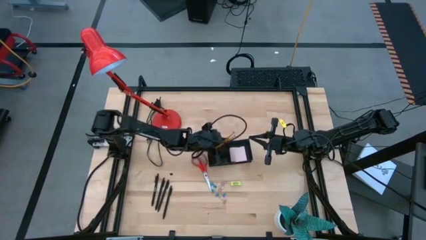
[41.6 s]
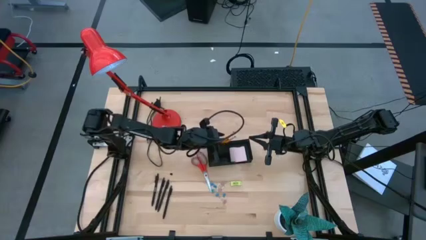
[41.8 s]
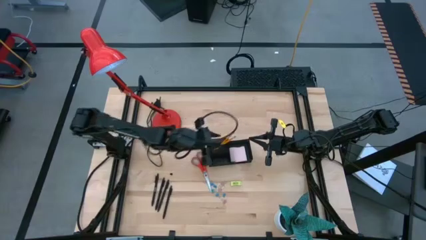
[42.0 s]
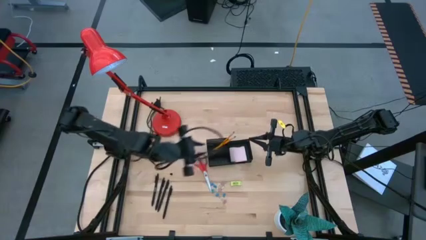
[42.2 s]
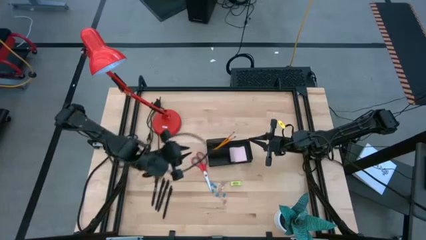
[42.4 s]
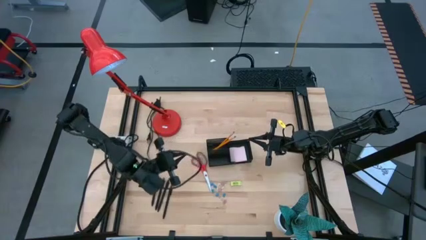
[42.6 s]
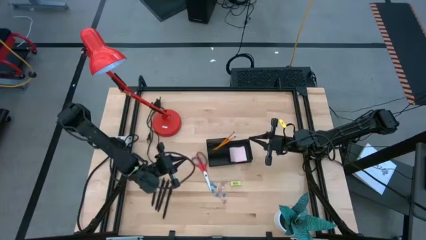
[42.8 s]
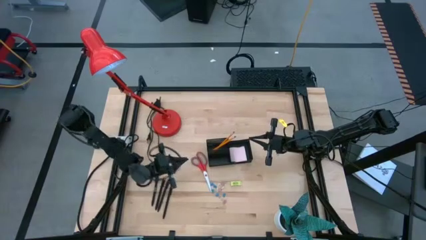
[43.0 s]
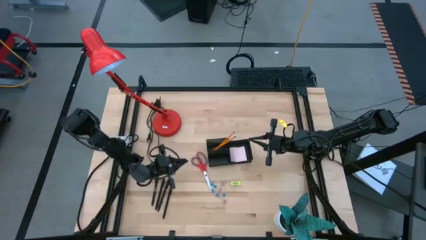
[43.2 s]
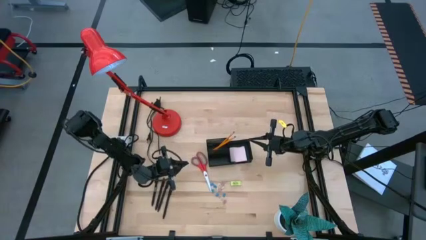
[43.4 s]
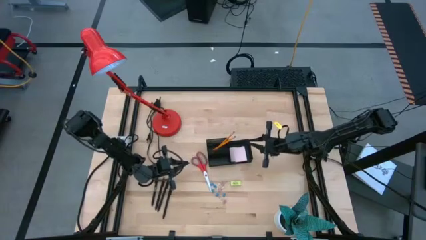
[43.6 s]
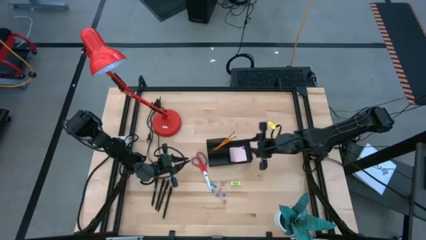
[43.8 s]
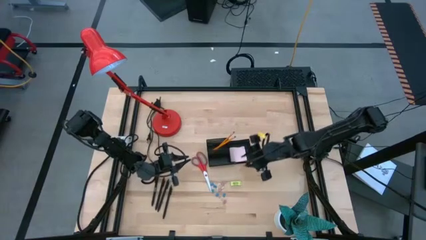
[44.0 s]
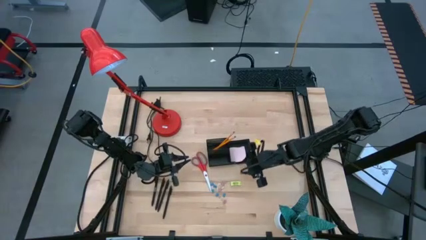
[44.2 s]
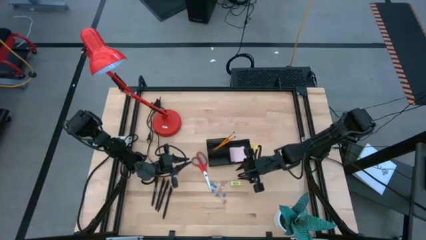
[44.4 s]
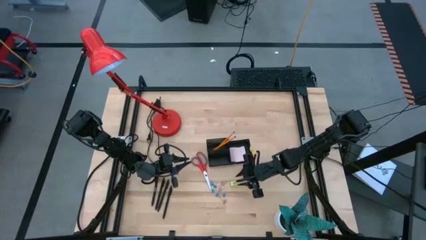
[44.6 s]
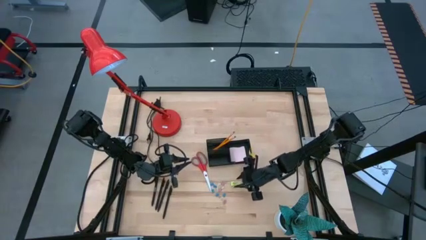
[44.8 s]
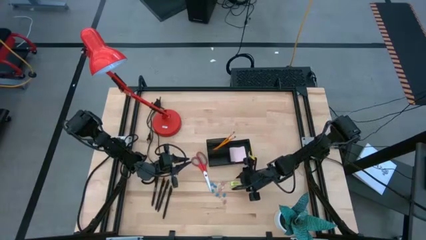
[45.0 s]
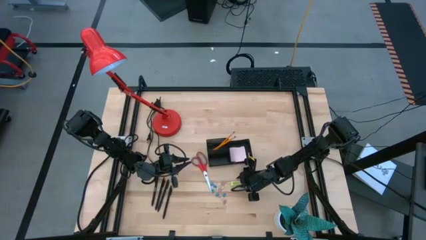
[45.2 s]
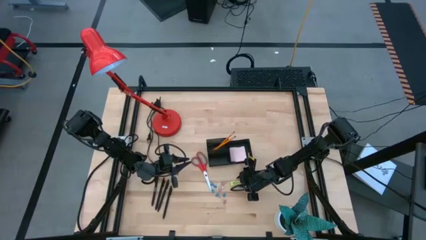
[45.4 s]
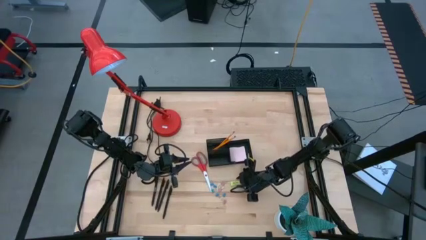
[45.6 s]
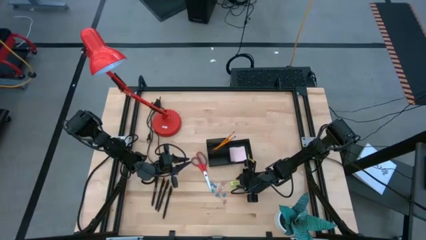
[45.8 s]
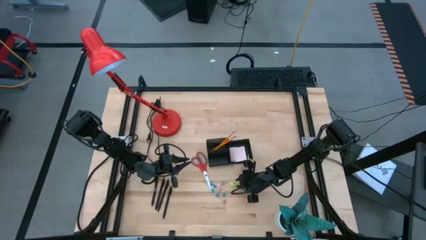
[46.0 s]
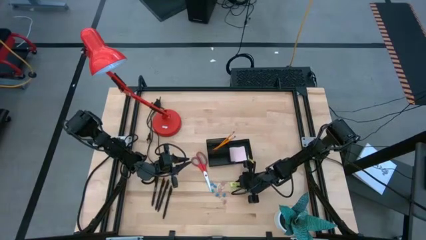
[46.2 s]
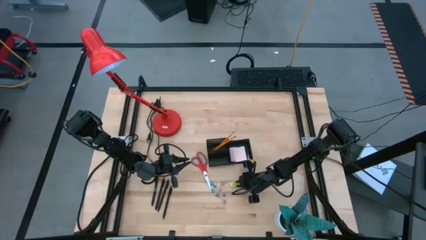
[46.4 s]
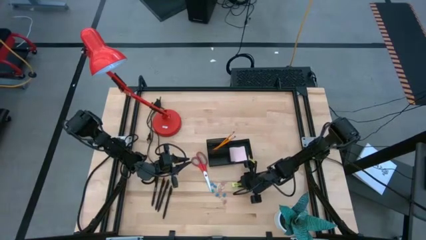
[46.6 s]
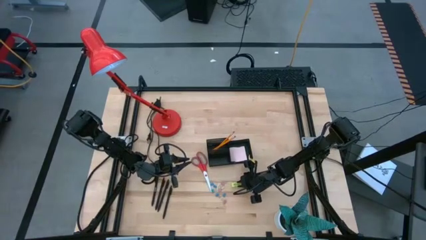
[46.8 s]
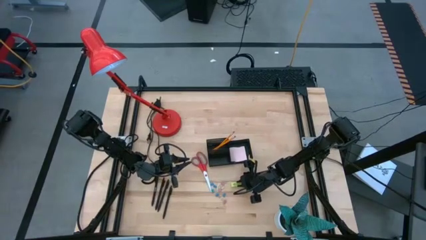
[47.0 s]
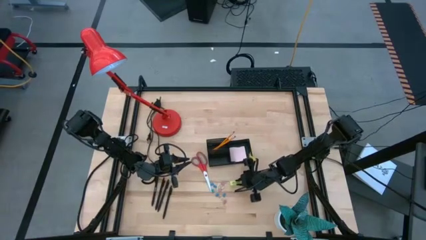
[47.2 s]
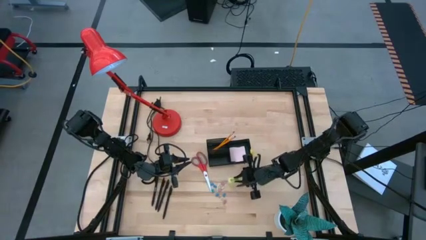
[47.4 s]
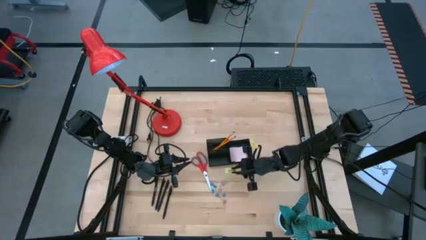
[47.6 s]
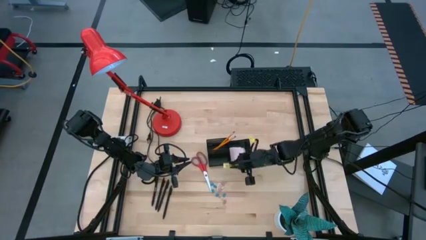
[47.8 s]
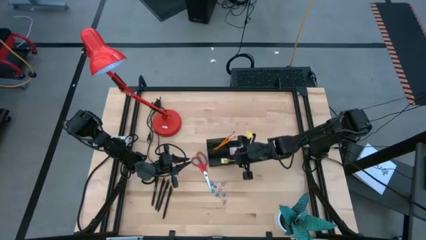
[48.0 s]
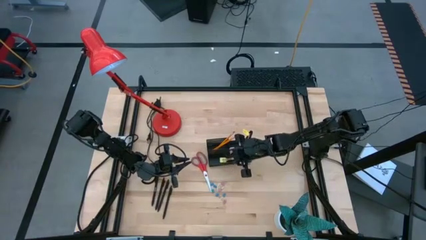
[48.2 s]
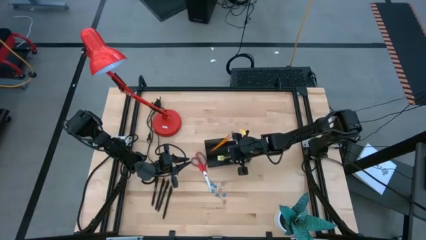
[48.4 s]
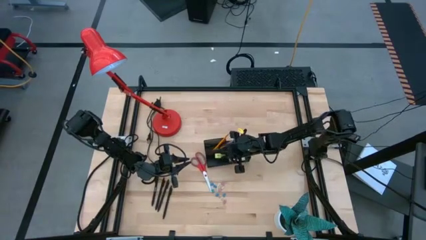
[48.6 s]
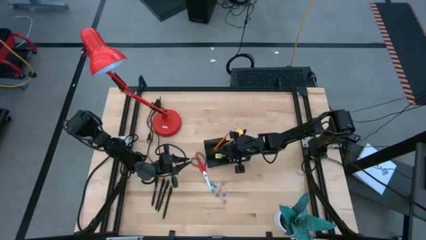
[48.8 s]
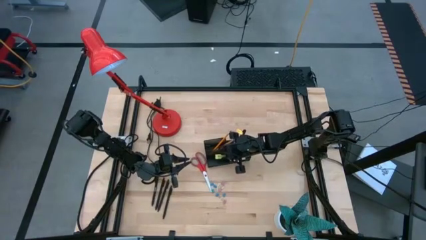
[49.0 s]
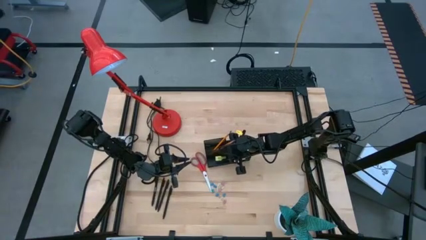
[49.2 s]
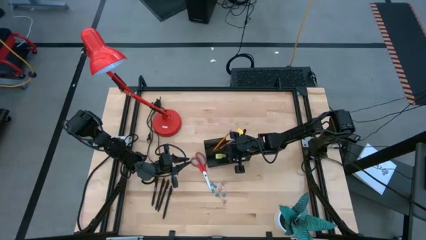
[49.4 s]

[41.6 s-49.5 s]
Task: Pick and place office supplies into organizer
Put the yellow eraser into the black desk organizer

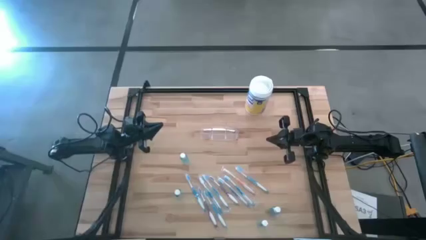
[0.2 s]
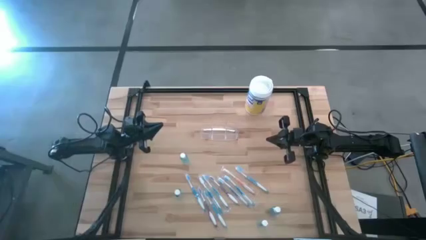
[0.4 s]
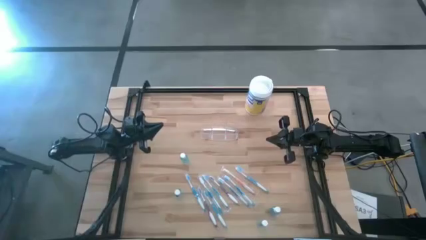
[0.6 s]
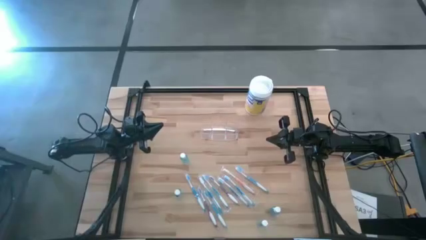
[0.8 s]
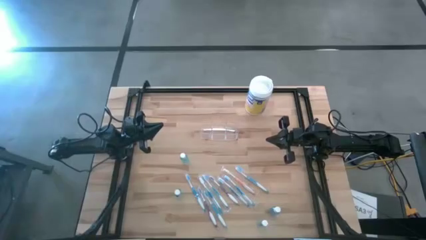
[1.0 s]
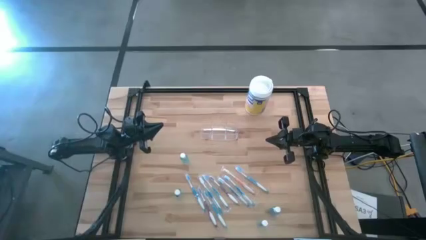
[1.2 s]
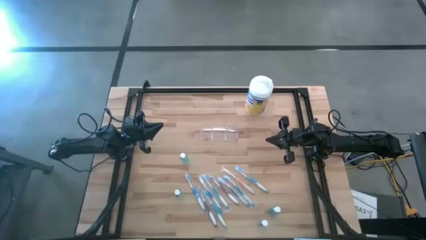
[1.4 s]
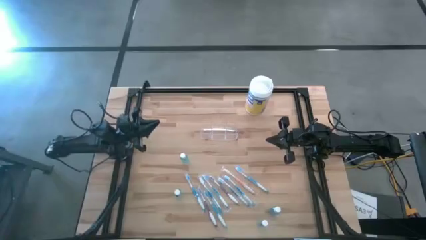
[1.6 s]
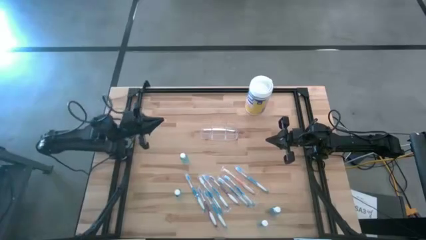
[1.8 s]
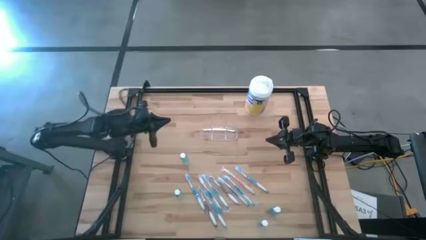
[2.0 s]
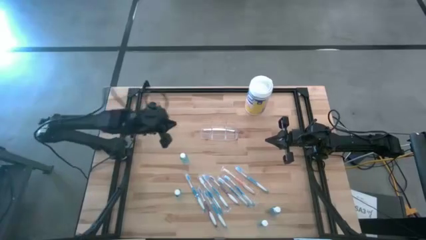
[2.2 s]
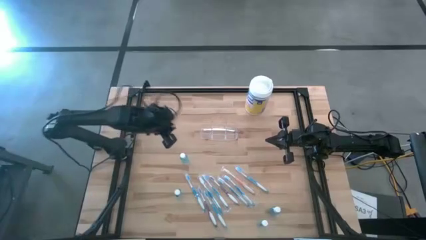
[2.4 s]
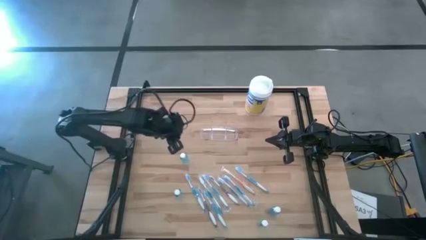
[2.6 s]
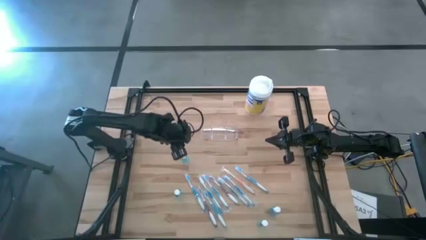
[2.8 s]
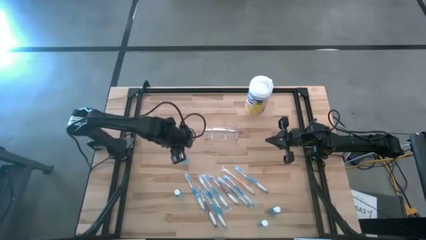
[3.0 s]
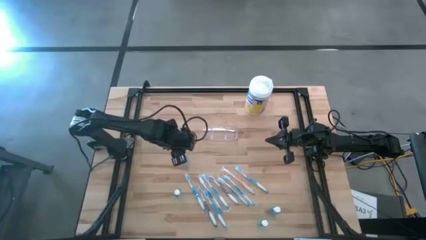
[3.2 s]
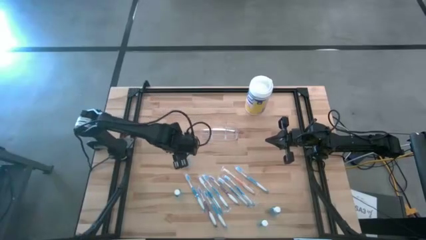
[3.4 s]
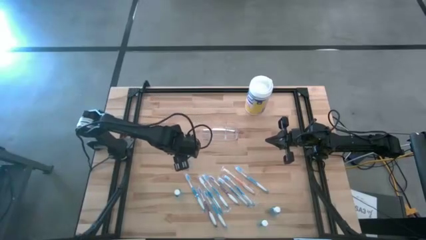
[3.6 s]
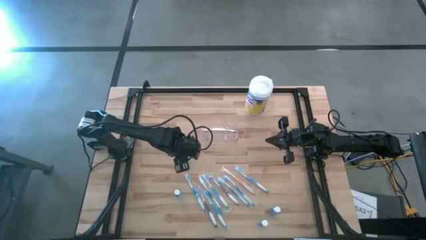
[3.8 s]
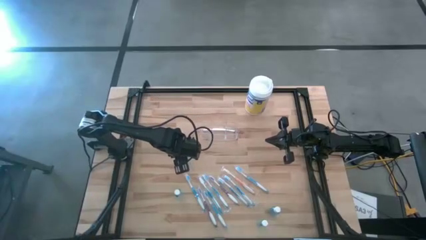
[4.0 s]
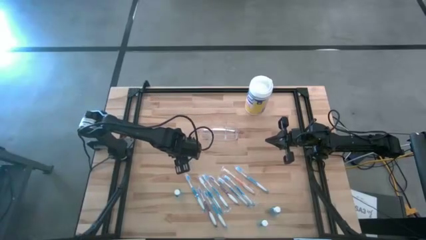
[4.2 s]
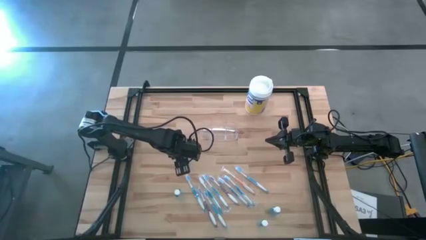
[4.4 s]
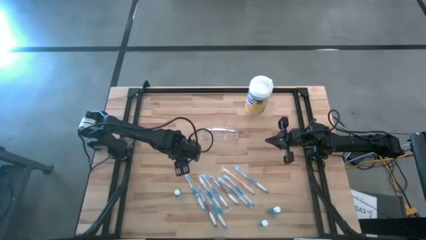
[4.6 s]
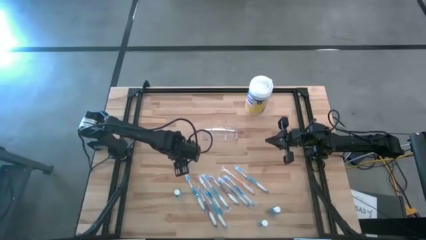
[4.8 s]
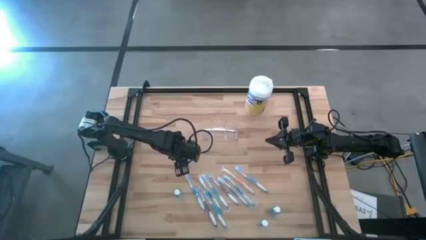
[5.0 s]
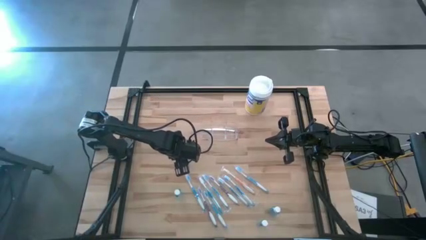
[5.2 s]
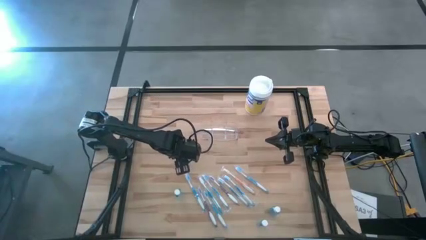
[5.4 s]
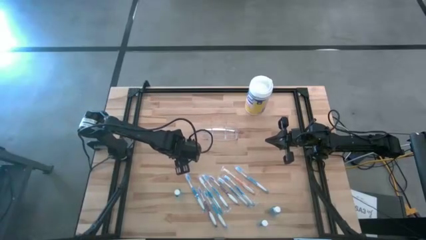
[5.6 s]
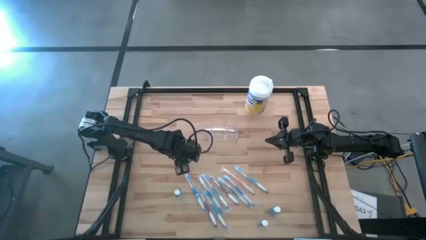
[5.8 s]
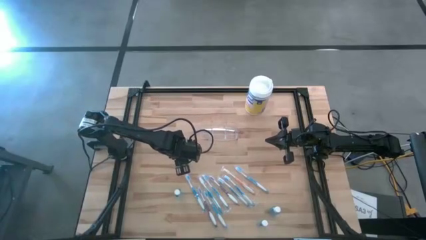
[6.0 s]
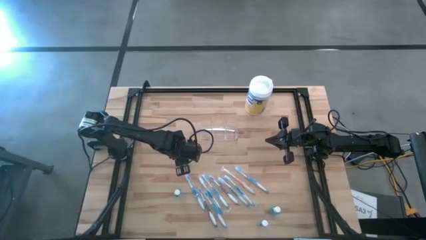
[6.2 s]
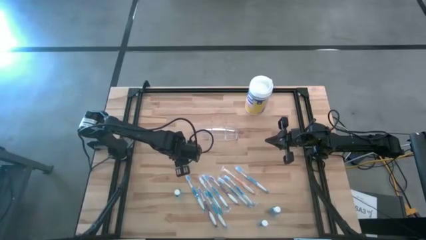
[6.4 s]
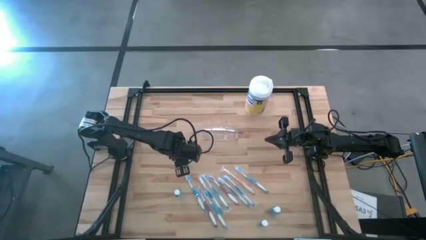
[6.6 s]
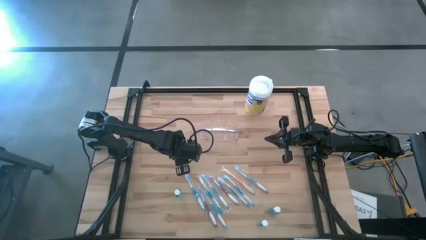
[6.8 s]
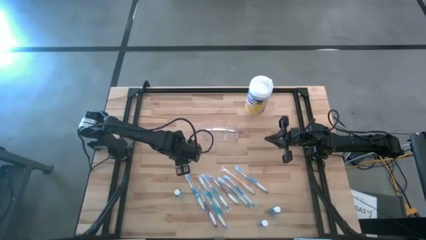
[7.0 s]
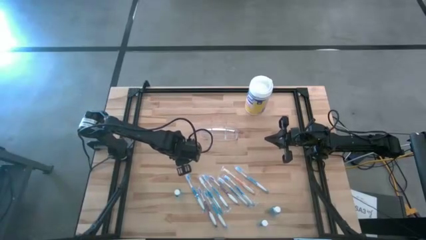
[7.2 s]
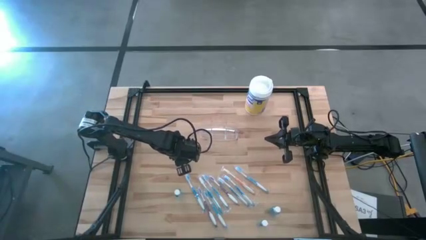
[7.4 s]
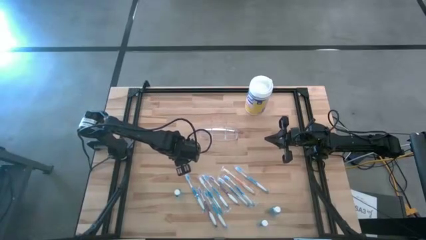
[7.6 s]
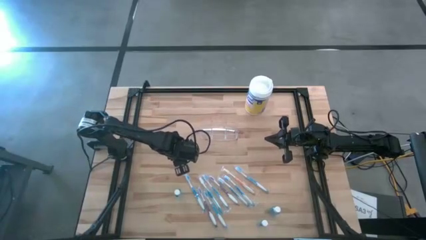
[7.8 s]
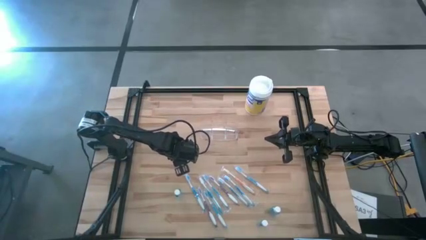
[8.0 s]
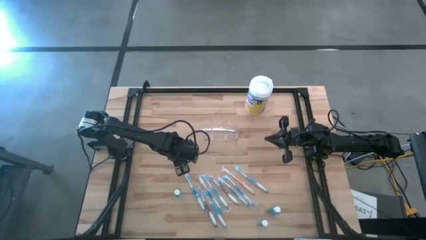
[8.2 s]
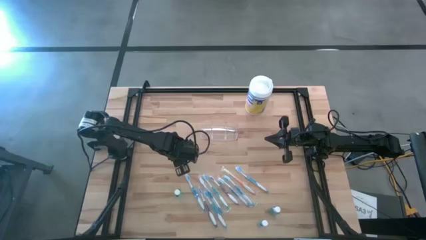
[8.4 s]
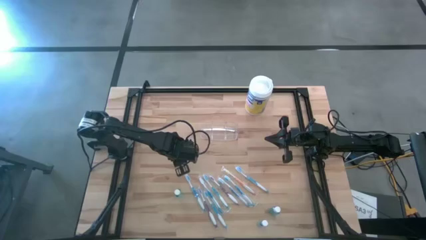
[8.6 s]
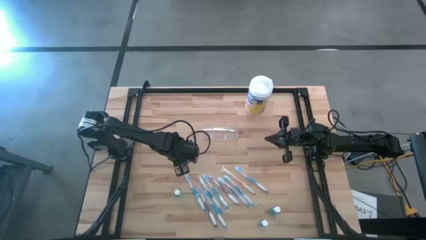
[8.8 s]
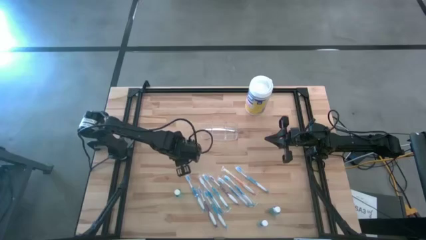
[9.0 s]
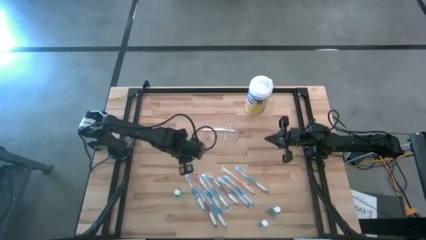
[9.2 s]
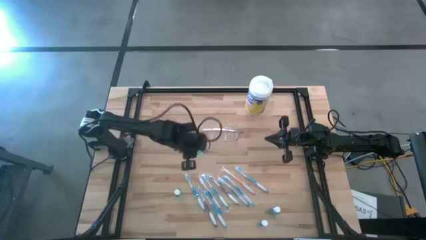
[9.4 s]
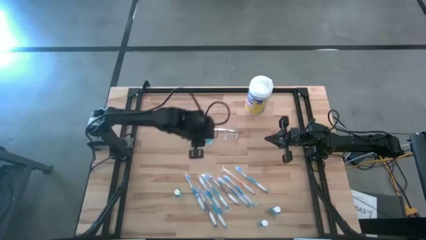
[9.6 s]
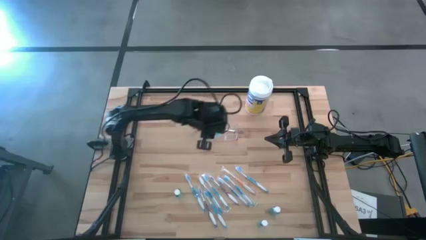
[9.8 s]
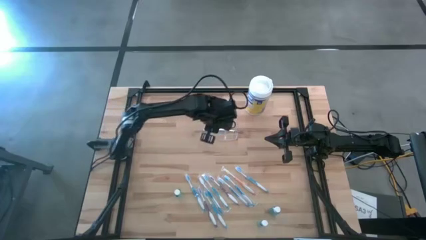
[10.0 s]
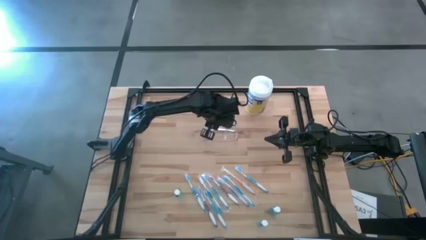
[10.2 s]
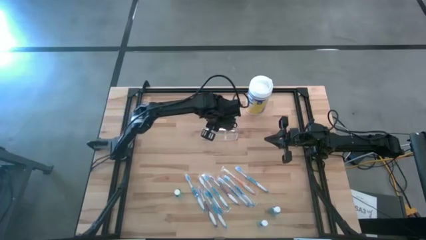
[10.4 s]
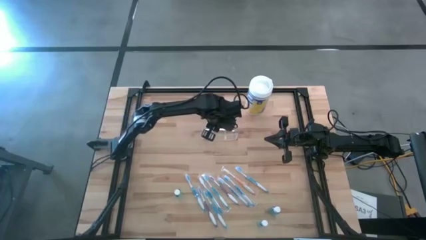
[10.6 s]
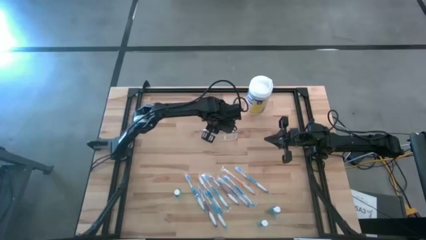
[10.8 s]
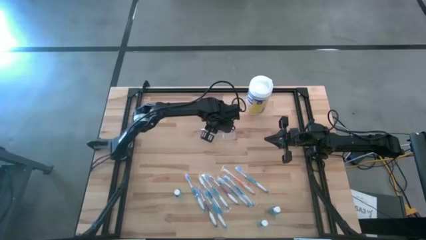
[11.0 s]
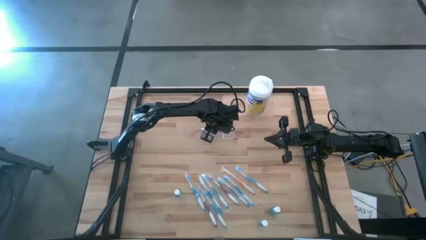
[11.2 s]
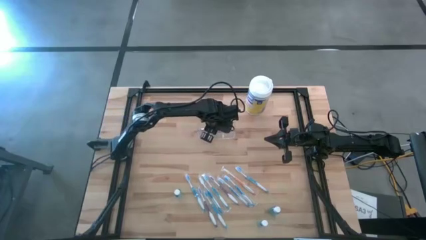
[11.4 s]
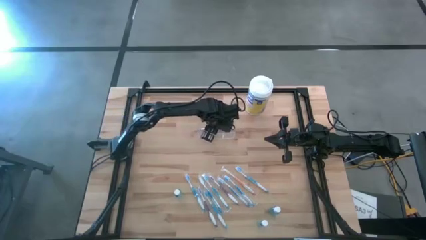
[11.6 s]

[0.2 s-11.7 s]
Task: Pick & Place toothbrushing station
Put the blue mouthwash into the transparent organizer
